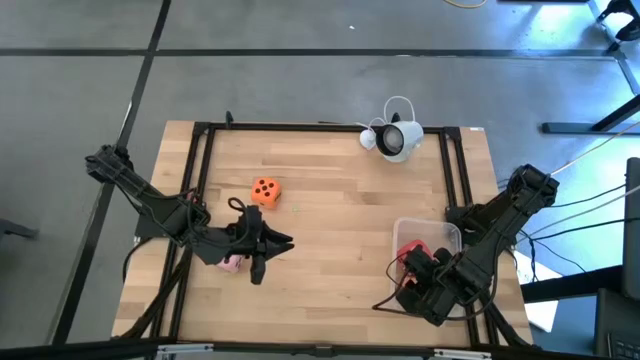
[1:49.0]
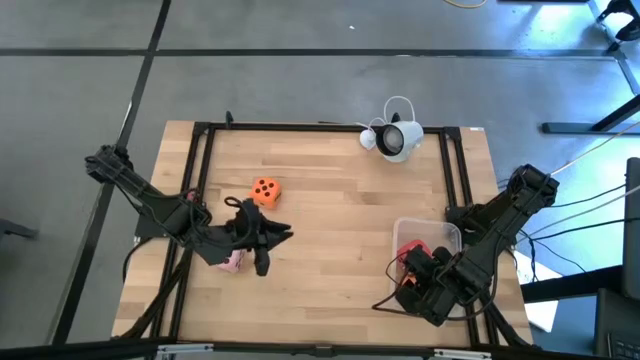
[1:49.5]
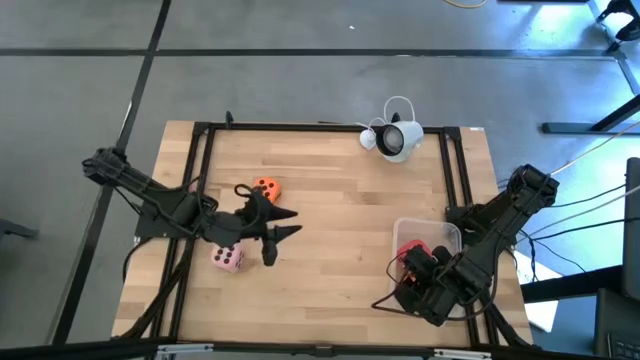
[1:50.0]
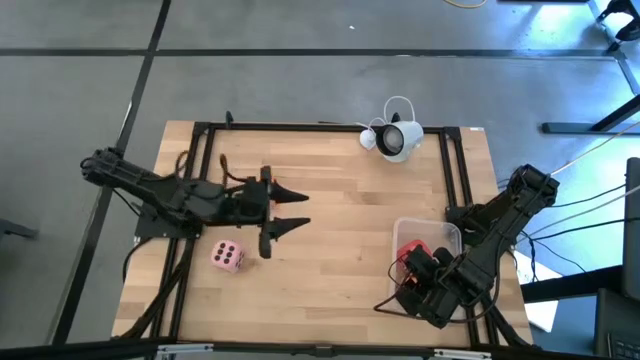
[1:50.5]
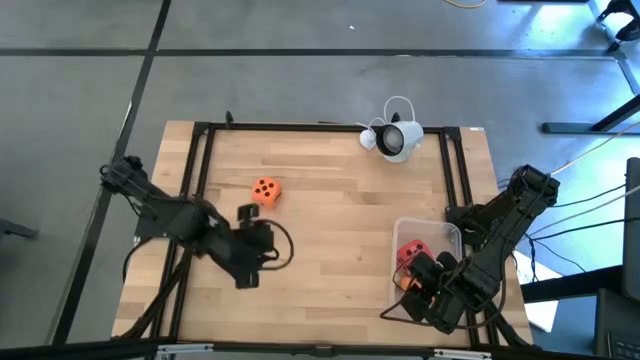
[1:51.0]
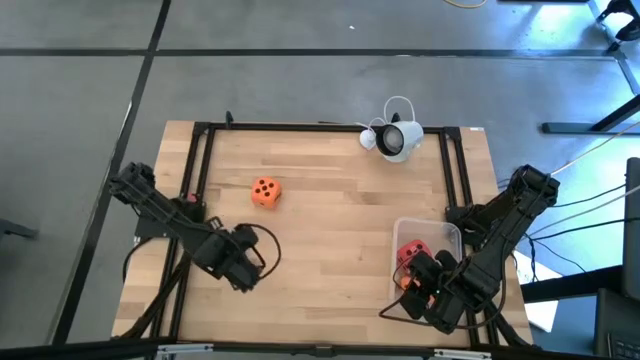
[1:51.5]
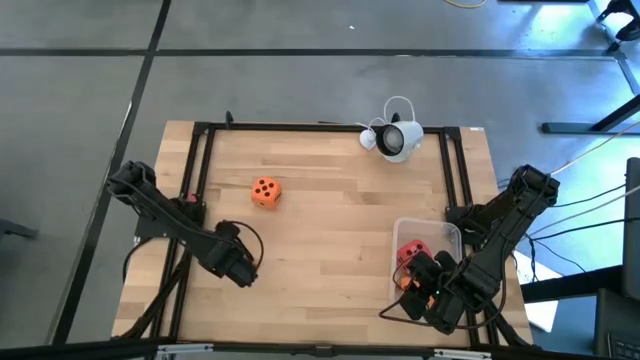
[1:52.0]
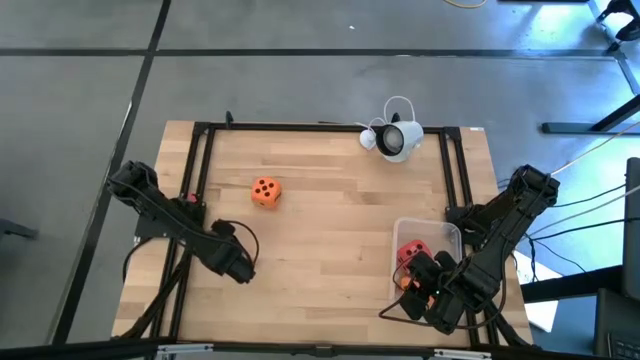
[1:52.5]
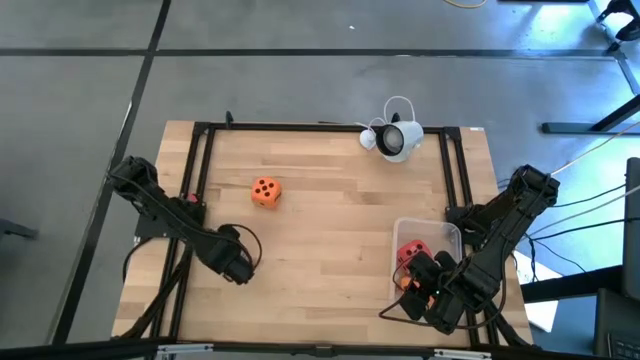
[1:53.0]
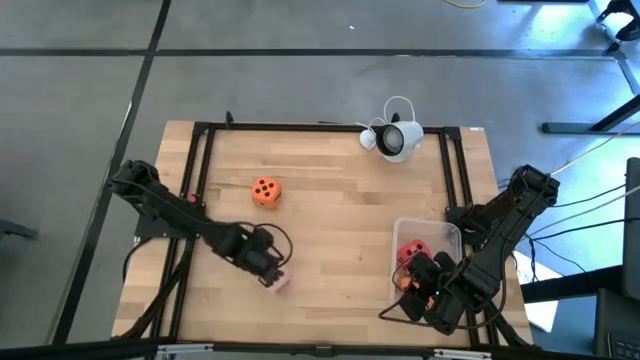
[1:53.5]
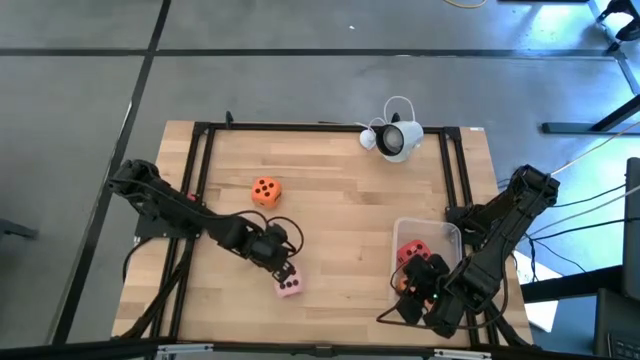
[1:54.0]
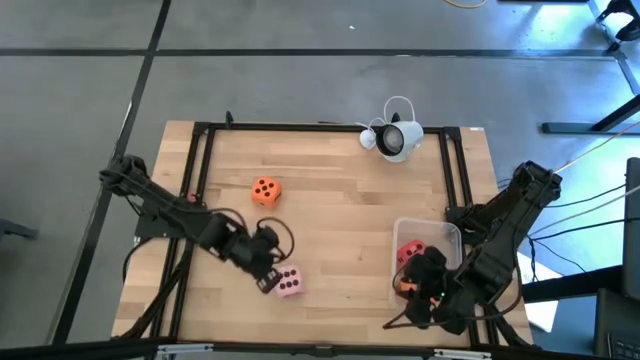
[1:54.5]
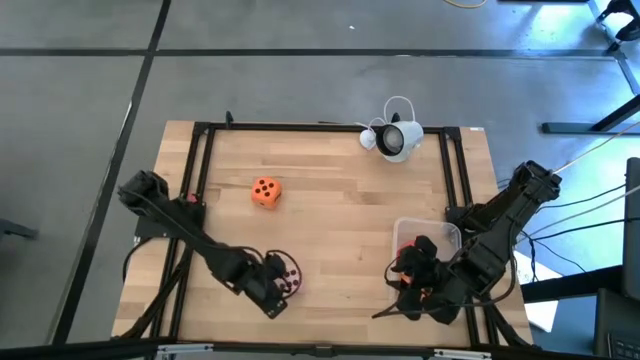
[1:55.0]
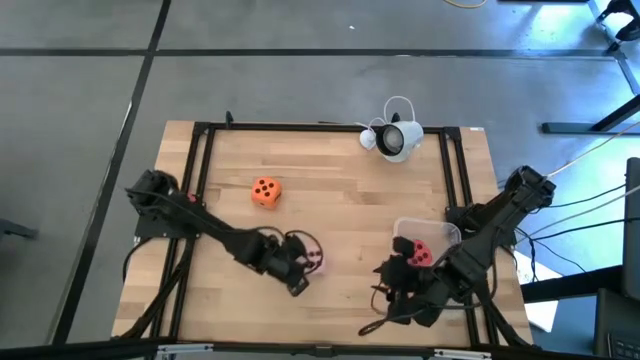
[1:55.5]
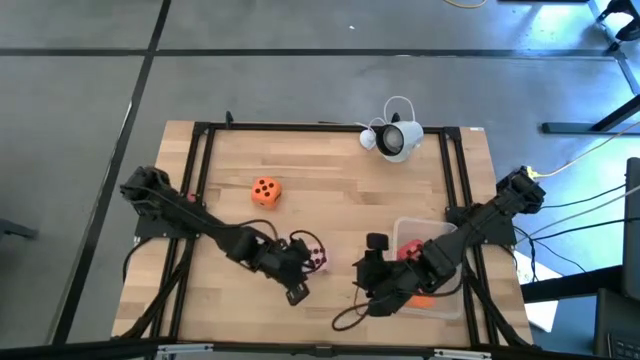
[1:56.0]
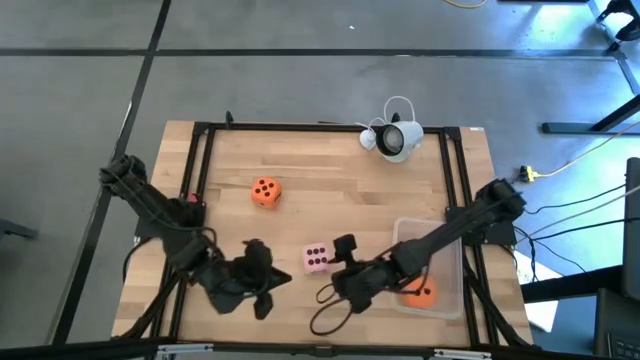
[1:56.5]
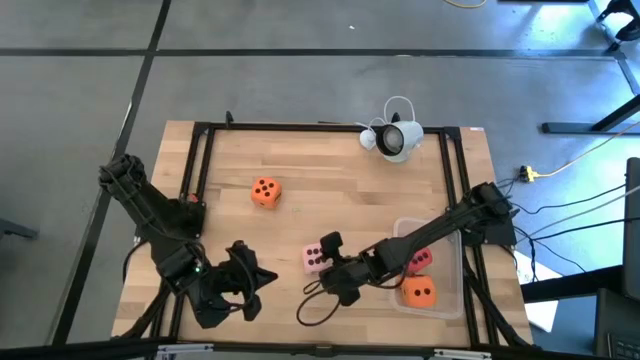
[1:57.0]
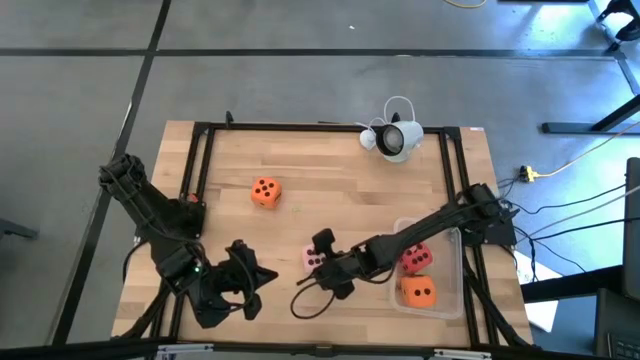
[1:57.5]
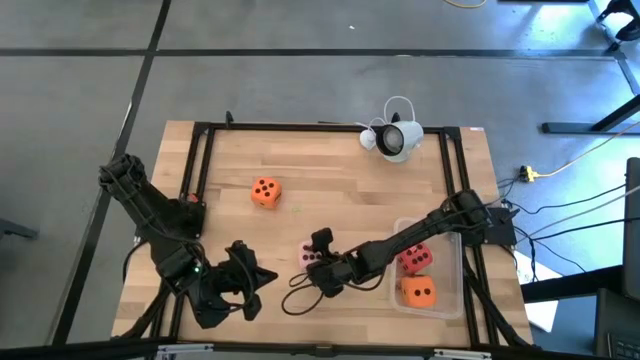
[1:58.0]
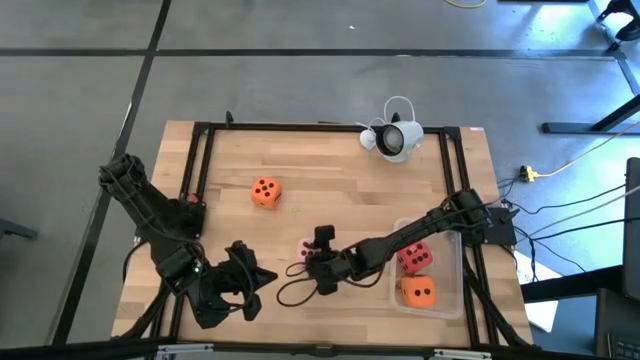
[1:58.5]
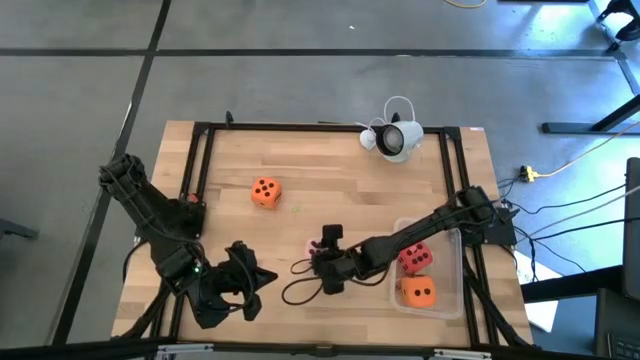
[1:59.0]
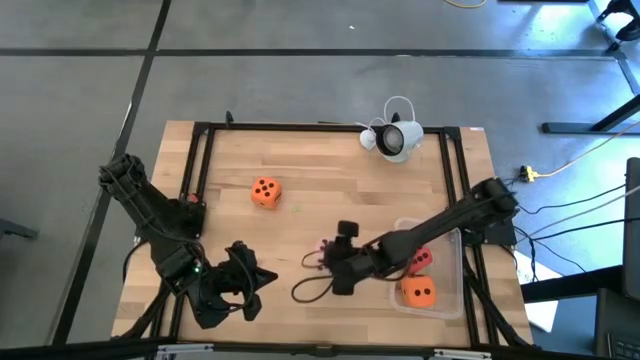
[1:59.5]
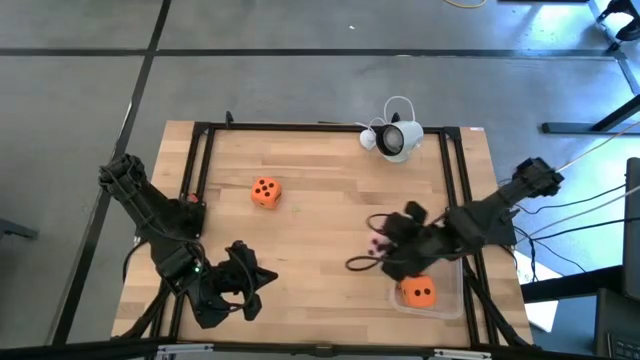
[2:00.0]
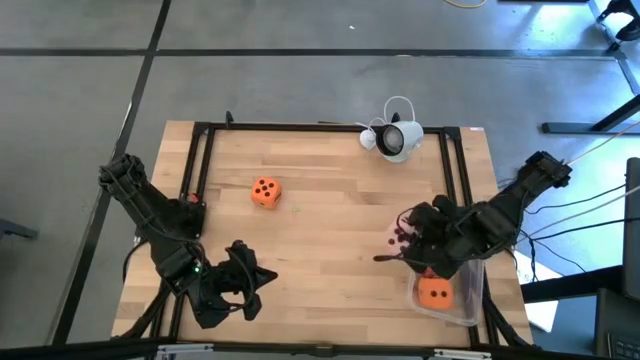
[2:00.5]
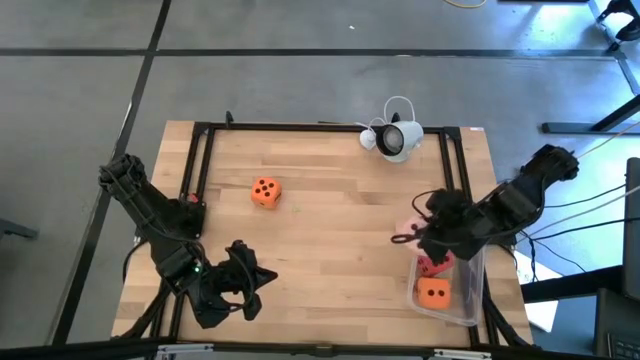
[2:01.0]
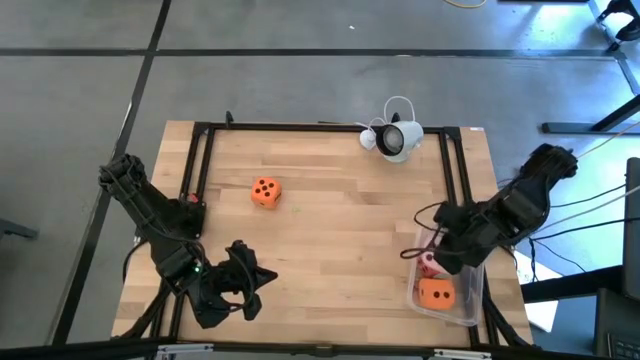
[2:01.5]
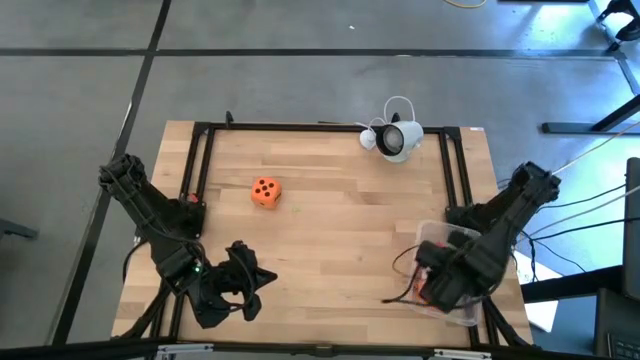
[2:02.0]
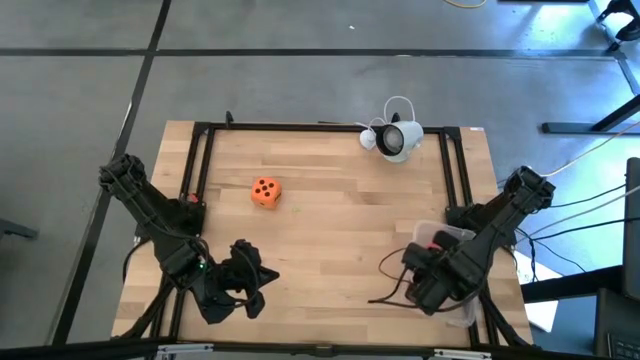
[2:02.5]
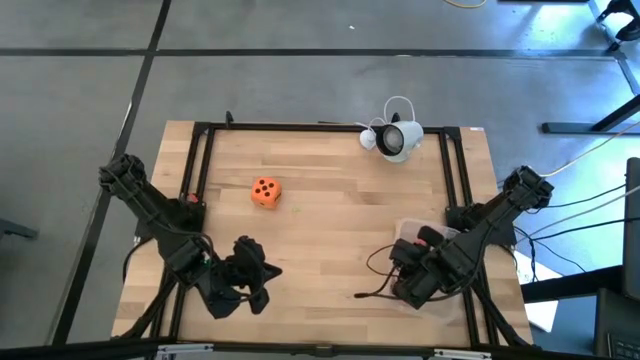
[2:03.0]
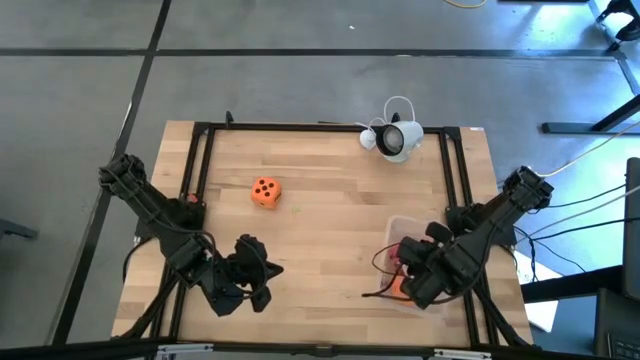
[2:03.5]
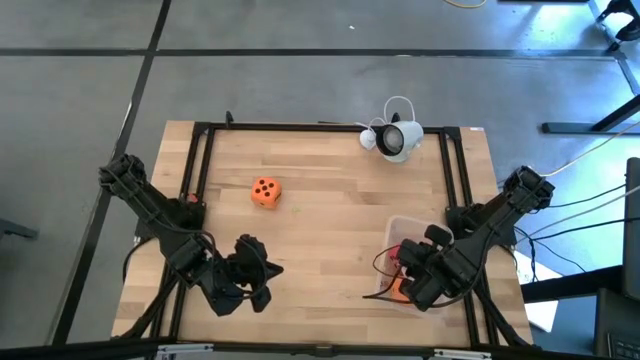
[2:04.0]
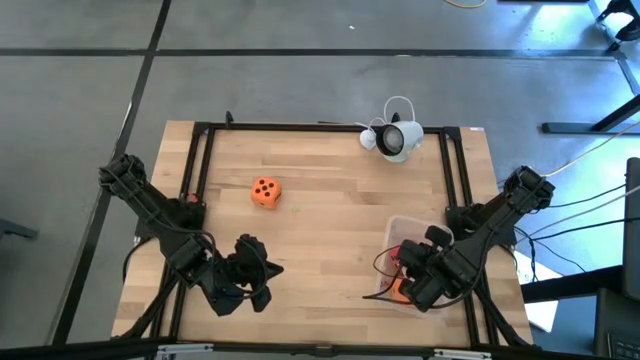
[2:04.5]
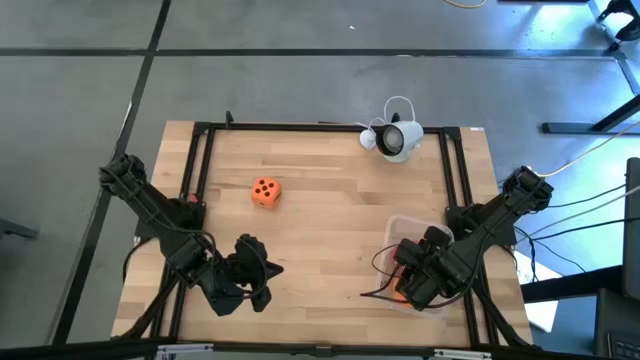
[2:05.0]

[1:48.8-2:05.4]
Task: Pick & Place Dice
Put the large pink die into the transparent bin

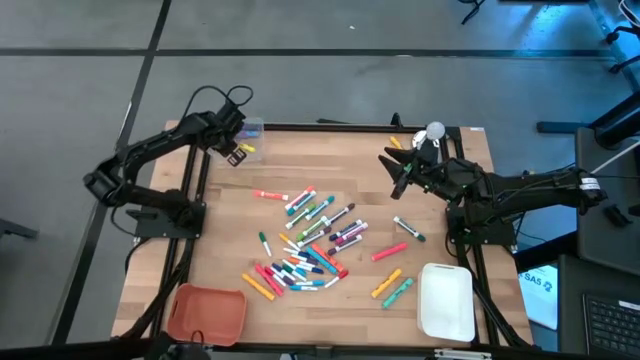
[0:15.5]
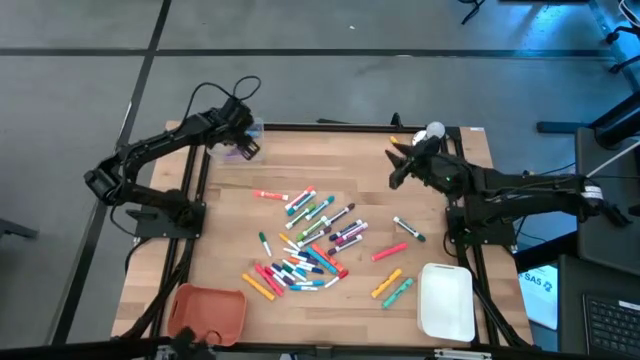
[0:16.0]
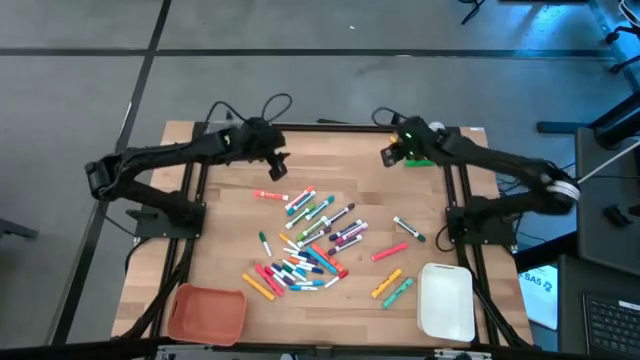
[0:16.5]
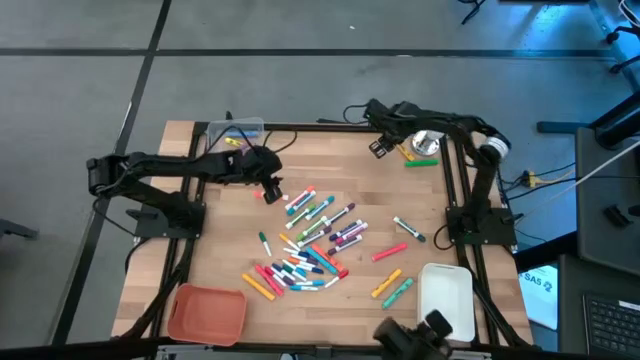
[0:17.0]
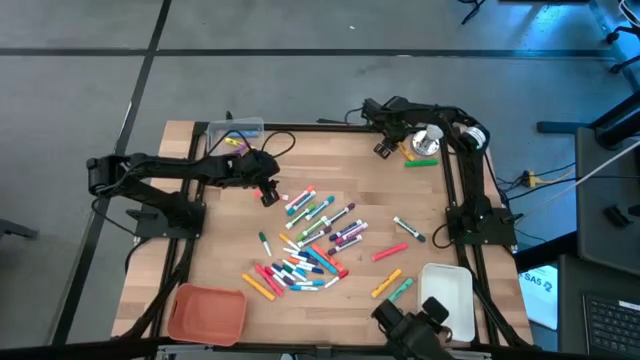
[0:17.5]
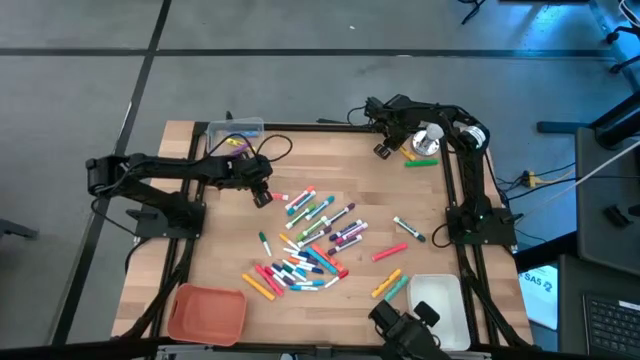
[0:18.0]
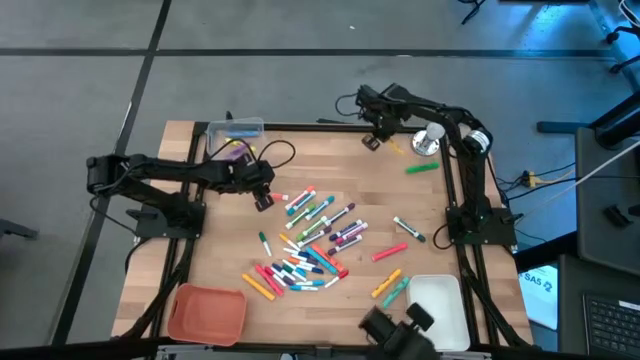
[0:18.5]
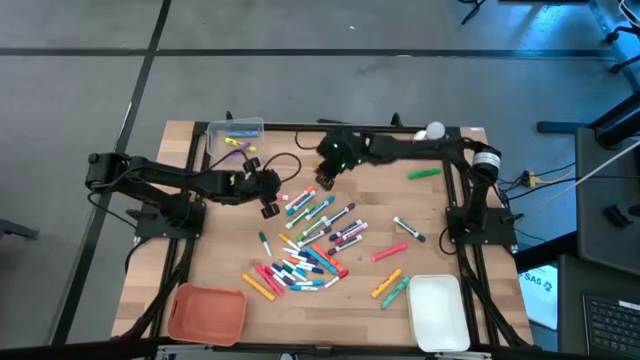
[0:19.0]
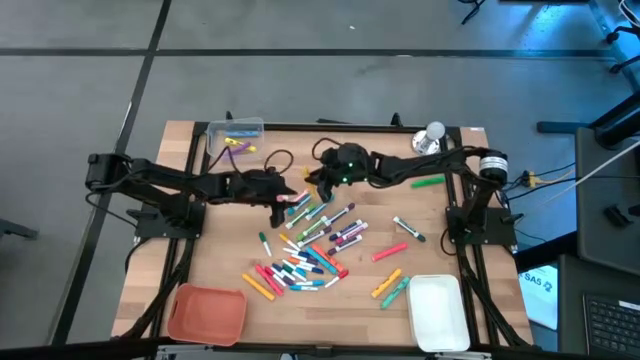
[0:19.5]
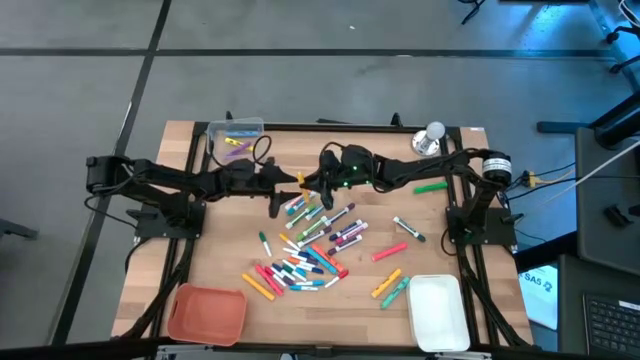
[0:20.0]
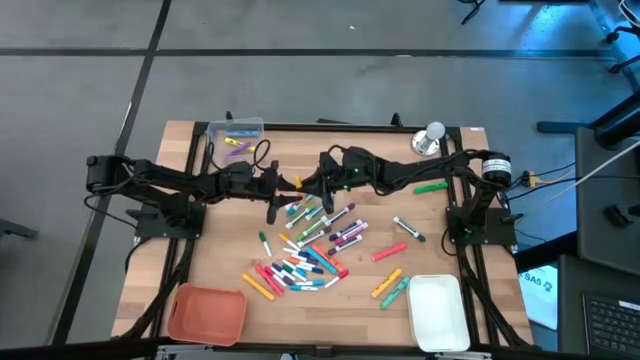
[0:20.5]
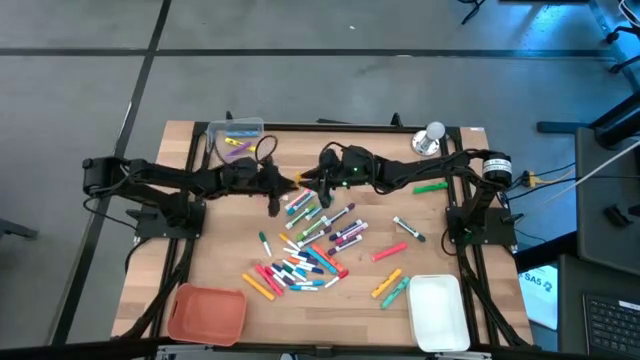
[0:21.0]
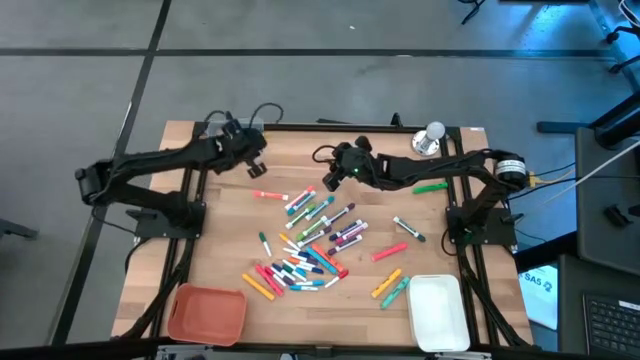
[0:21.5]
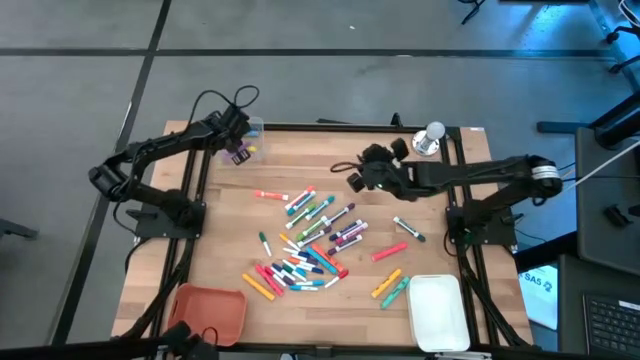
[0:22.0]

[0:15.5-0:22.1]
Task: Pick & Place Markers
Put the yellow pen into the transparent bin
